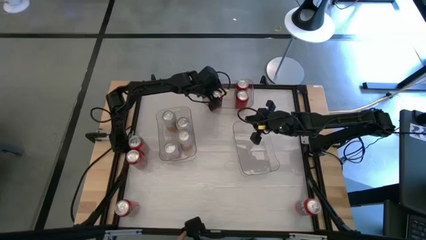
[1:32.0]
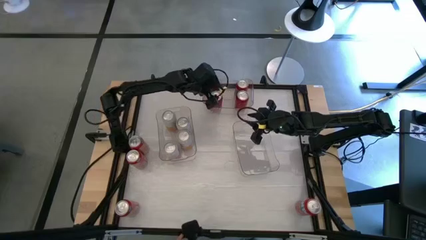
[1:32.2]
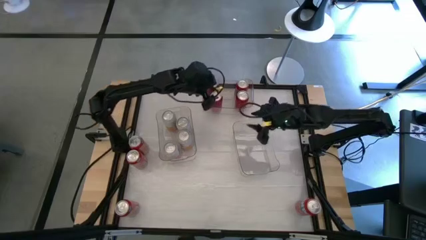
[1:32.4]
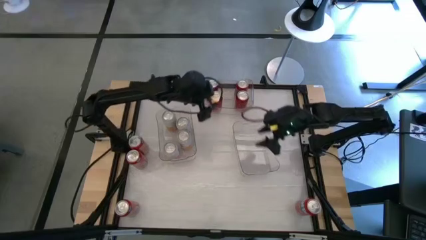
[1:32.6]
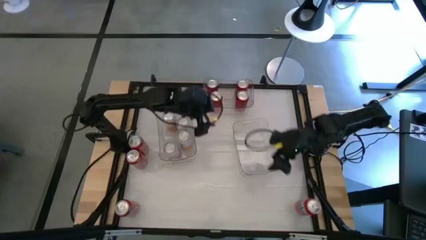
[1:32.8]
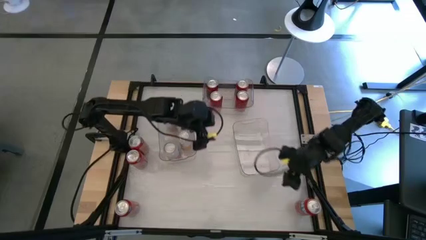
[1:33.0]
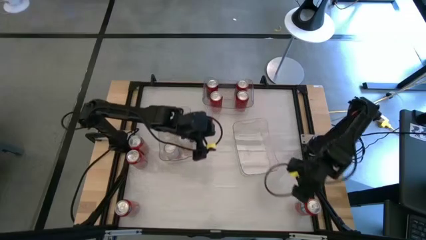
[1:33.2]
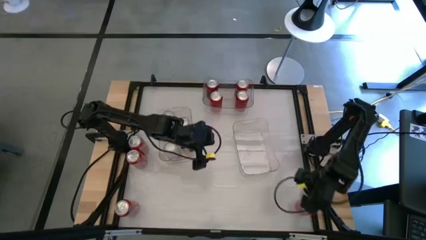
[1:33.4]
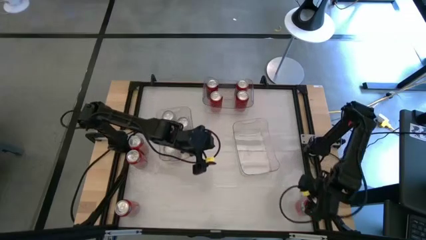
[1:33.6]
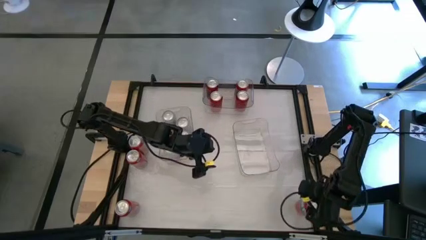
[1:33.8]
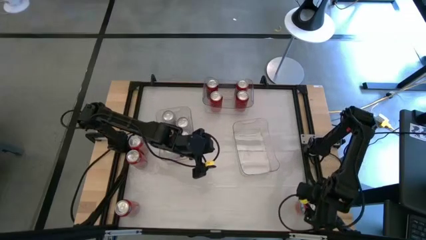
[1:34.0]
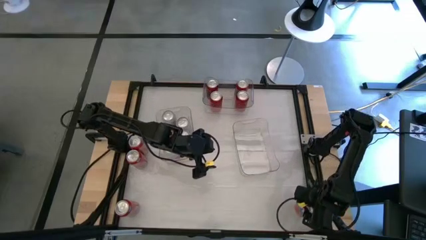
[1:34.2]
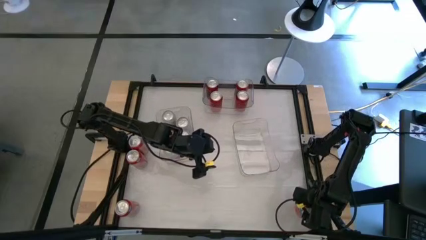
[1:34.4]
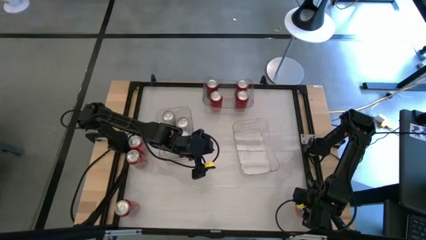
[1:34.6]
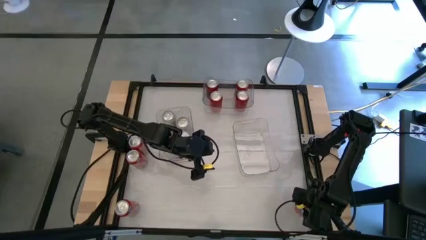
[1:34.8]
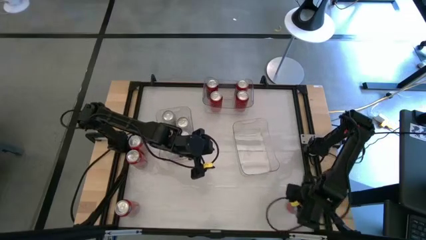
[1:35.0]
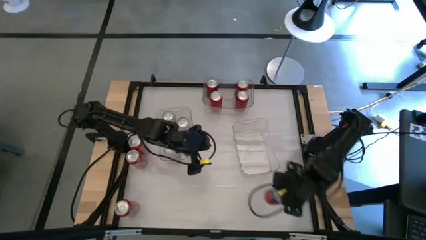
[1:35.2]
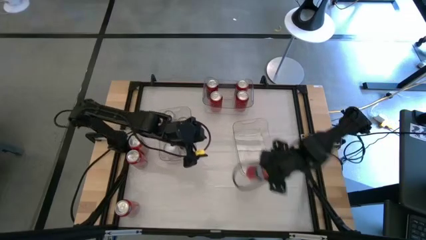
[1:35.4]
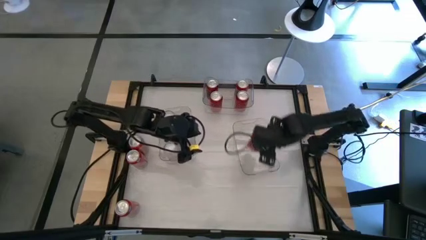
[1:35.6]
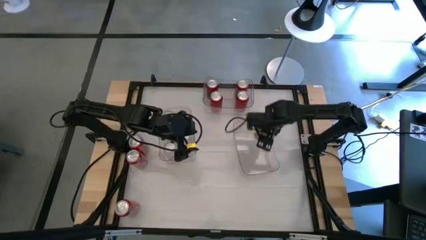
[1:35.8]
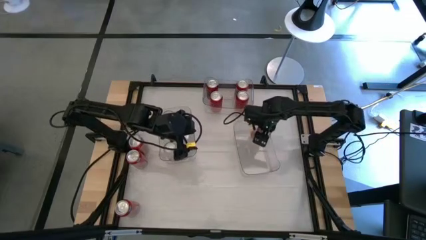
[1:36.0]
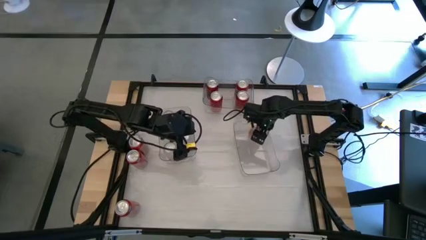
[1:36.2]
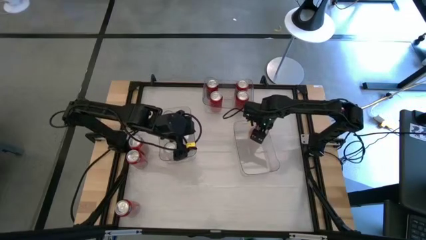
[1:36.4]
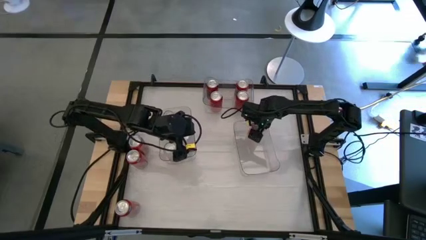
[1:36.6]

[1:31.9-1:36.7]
Task: Sort soda cans
Put the bottom right red soda can into the right transparent bin

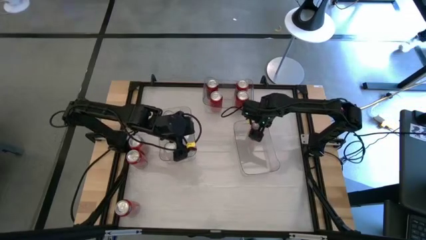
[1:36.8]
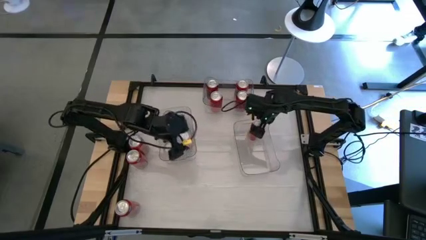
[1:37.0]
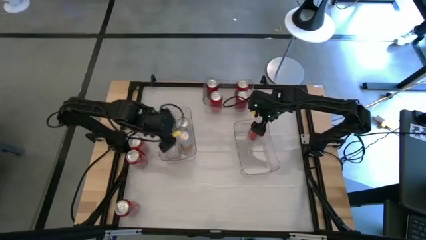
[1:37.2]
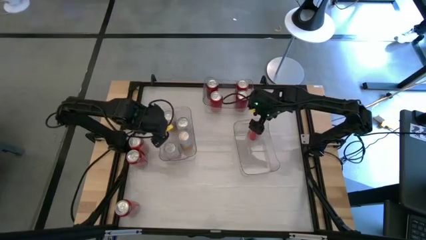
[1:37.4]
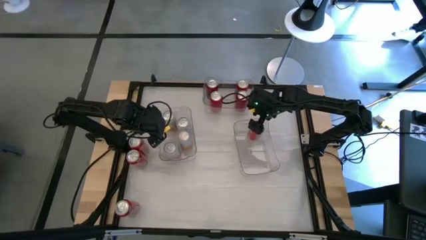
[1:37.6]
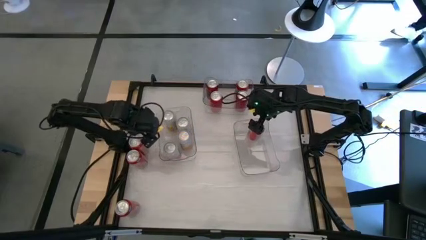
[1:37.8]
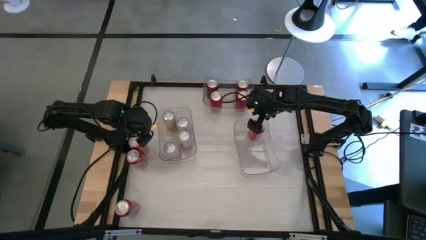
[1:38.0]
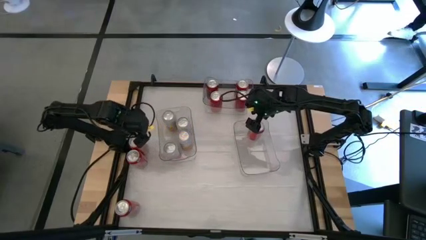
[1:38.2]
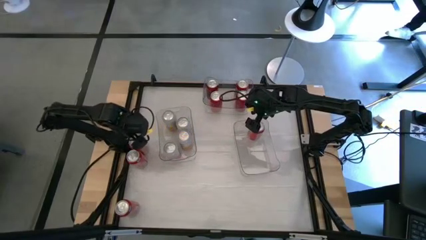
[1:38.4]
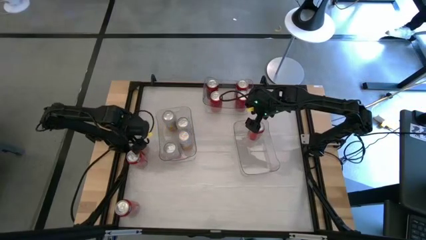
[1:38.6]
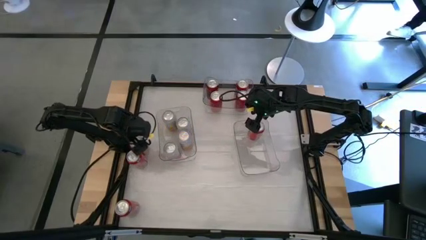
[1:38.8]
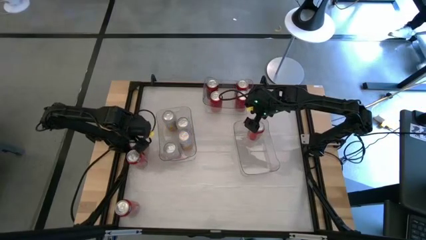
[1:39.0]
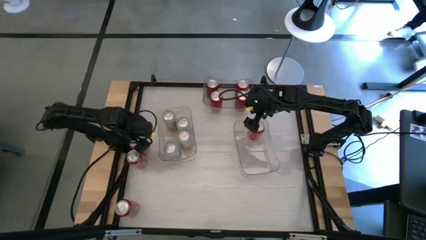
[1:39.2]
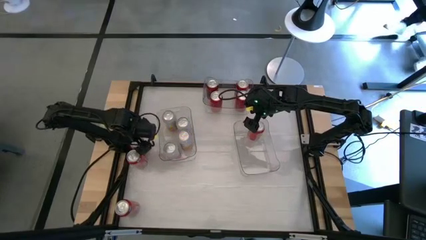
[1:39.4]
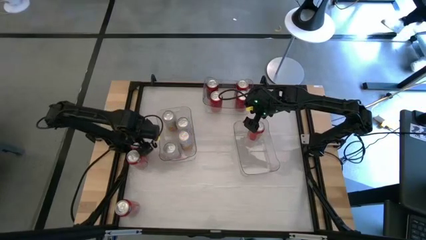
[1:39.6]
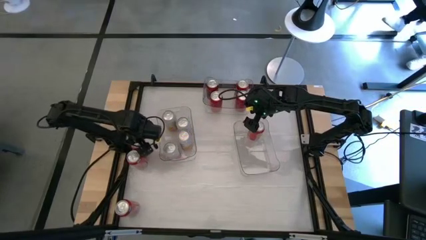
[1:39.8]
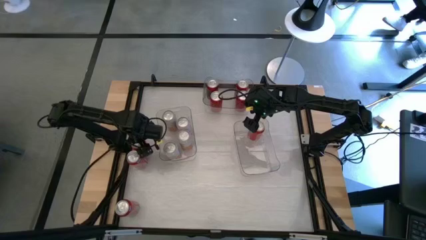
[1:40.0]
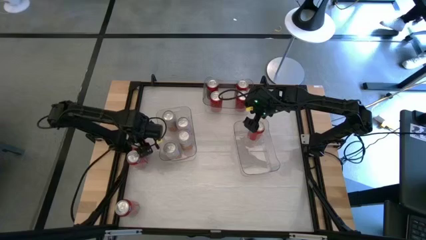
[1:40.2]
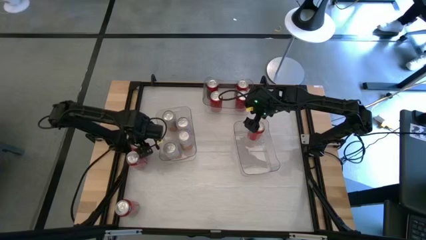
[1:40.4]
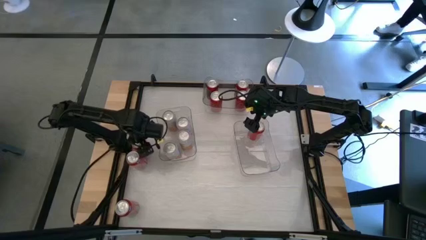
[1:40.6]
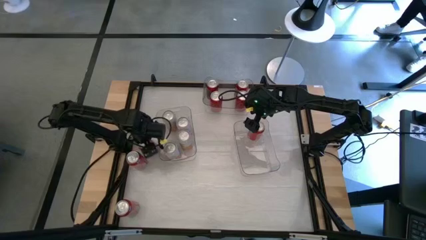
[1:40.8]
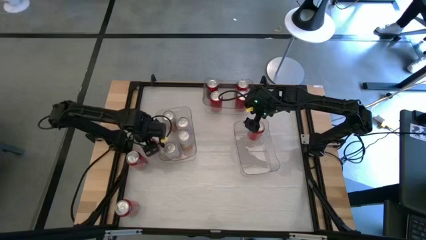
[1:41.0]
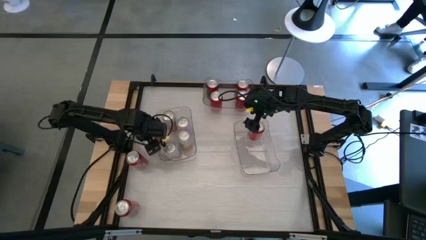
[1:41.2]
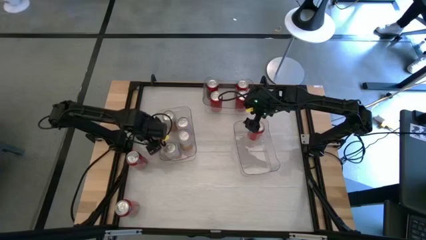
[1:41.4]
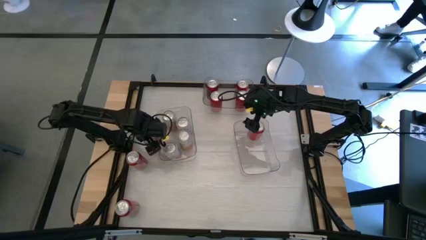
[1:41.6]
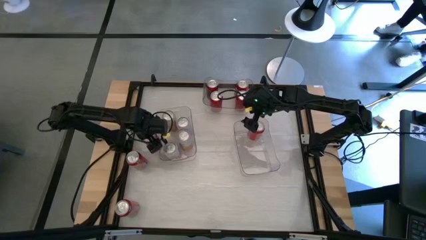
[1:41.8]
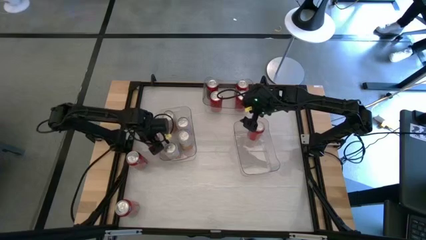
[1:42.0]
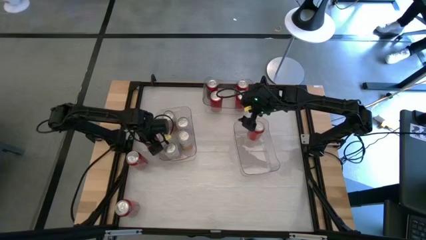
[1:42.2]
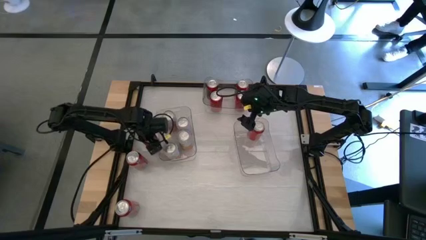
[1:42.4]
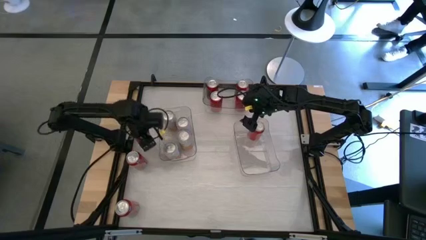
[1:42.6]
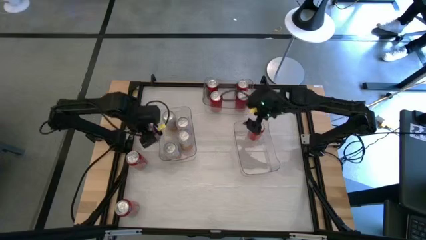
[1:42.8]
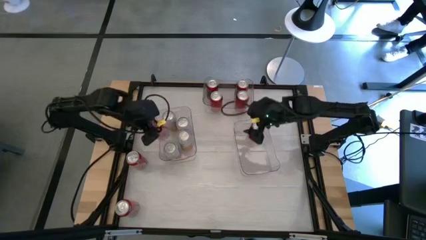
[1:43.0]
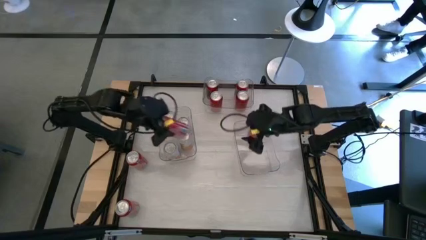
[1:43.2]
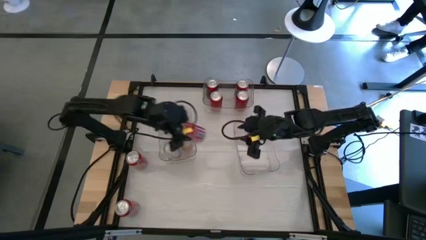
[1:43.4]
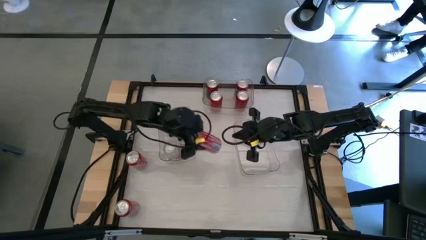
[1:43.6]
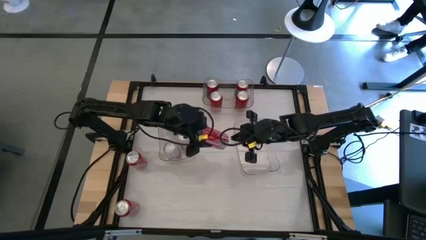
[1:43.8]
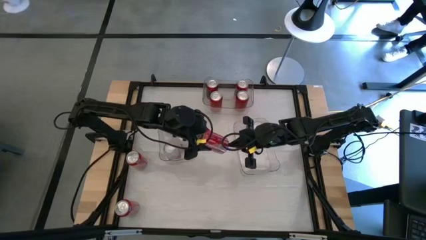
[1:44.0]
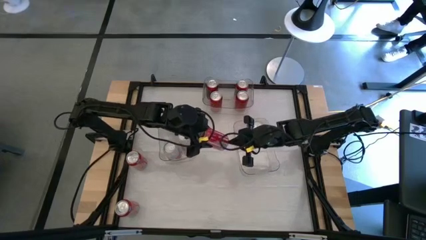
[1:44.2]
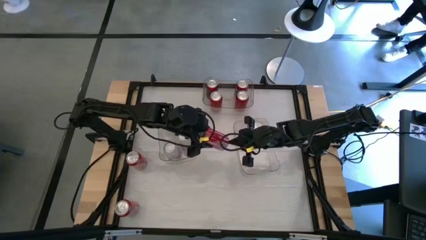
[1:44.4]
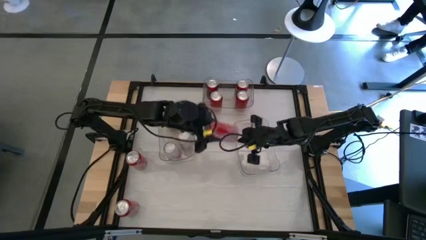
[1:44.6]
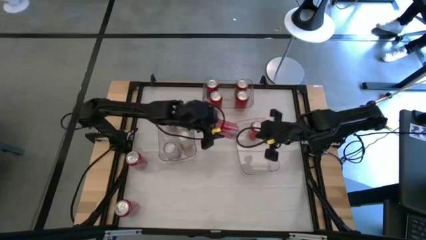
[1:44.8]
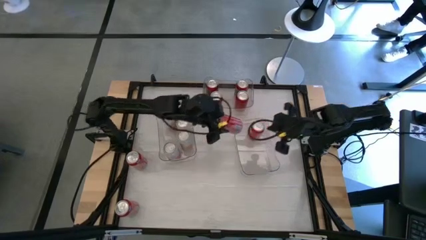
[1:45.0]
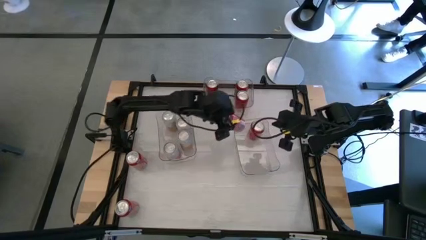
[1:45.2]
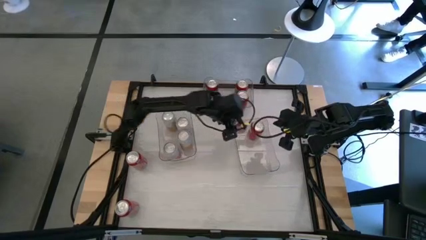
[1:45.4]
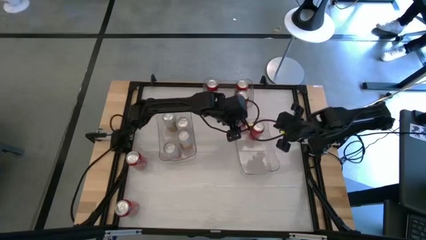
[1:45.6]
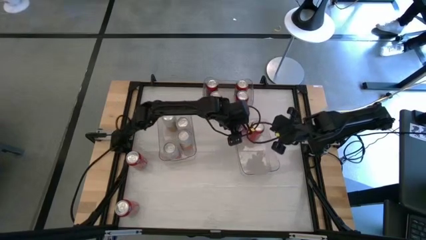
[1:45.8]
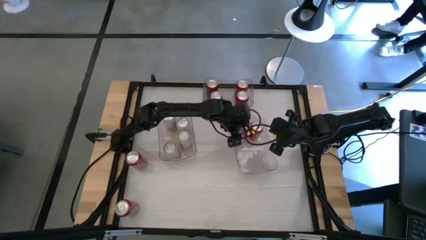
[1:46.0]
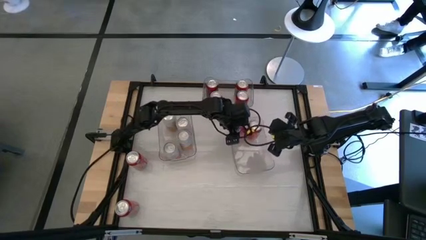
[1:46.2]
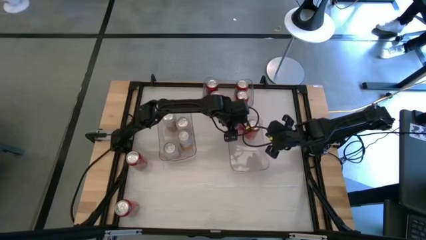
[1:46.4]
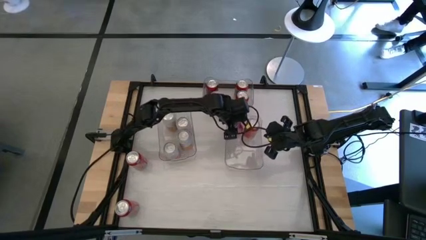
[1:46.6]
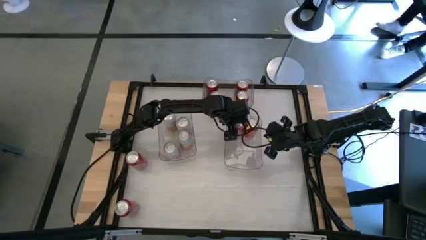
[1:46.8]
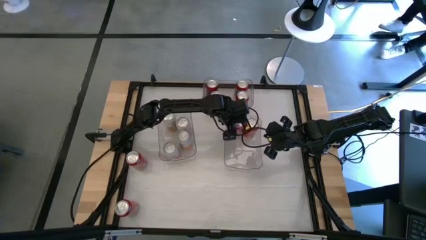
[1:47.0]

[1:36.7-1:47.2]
Put the top left red soda can into the right transparent bin
